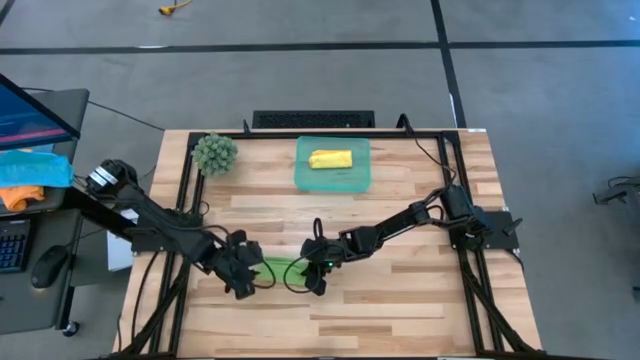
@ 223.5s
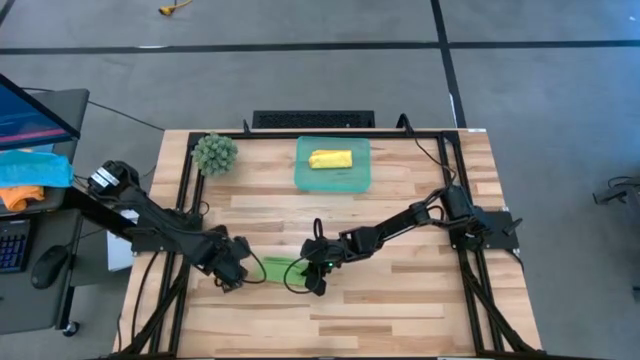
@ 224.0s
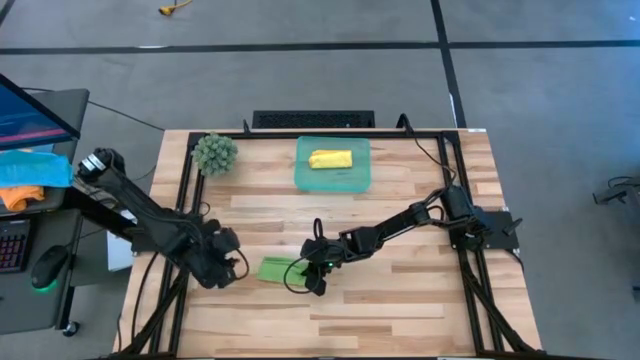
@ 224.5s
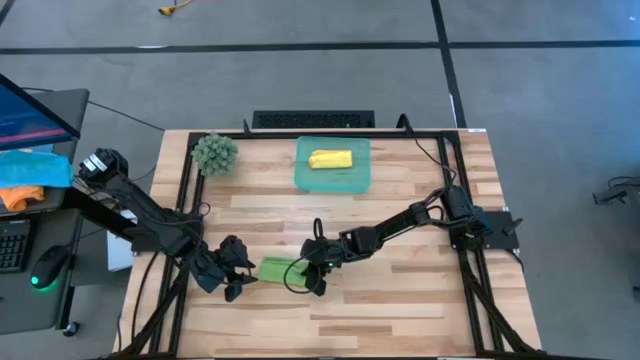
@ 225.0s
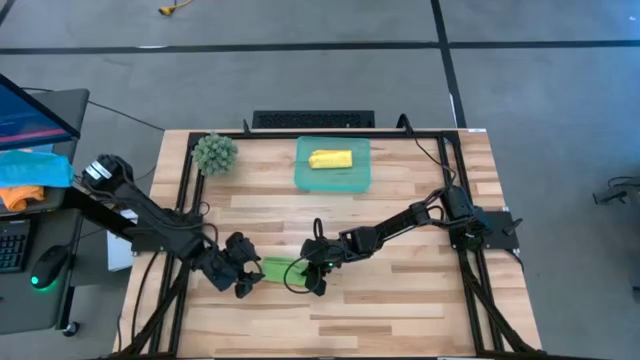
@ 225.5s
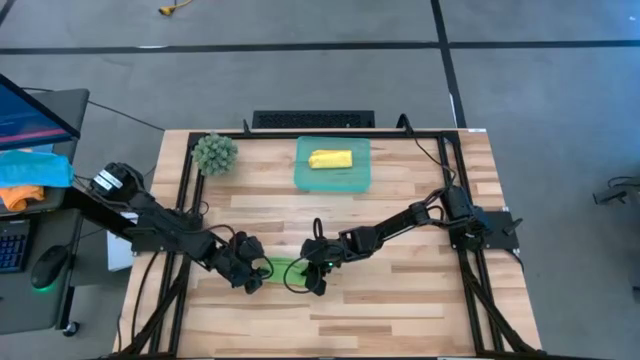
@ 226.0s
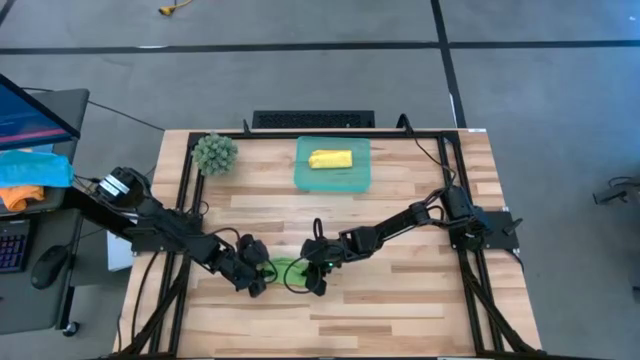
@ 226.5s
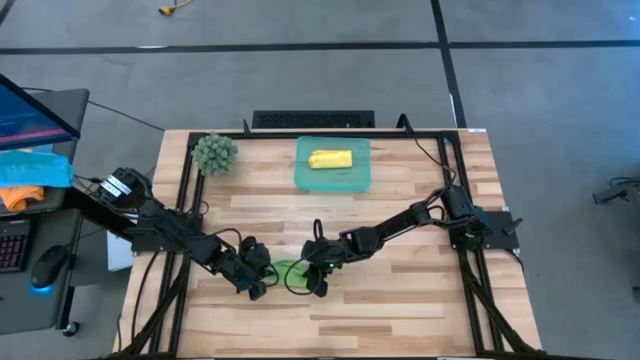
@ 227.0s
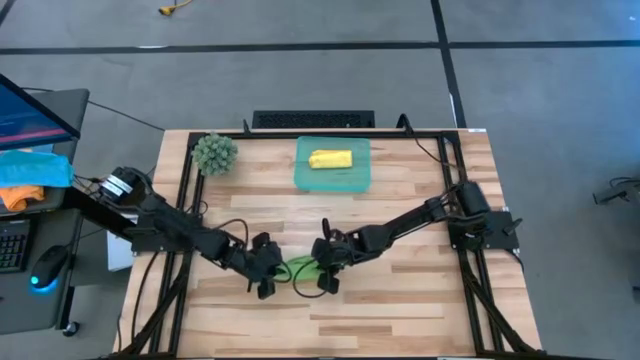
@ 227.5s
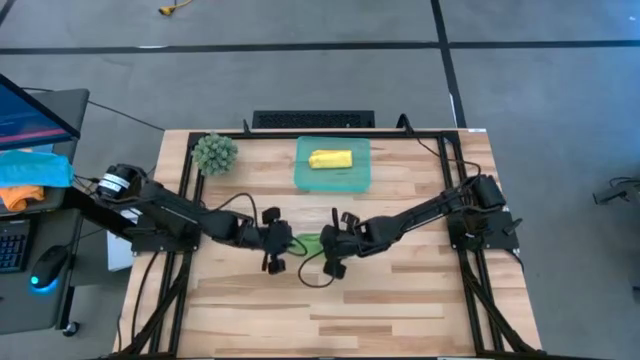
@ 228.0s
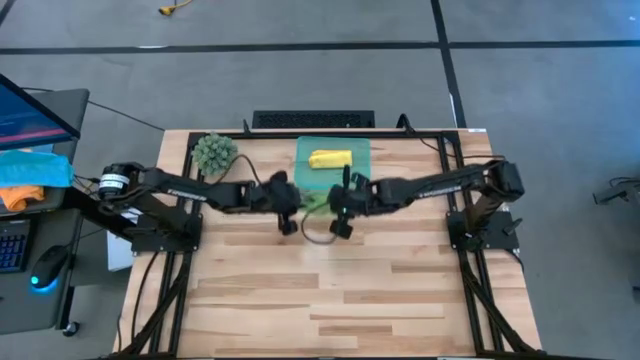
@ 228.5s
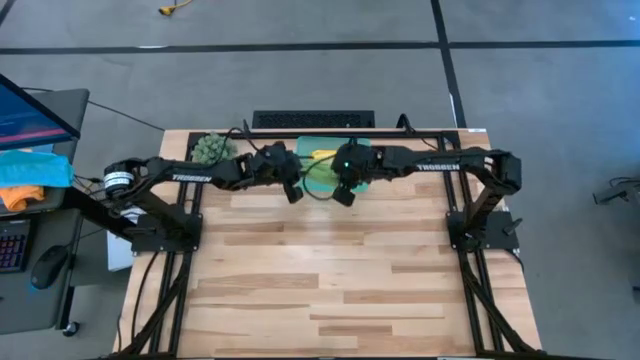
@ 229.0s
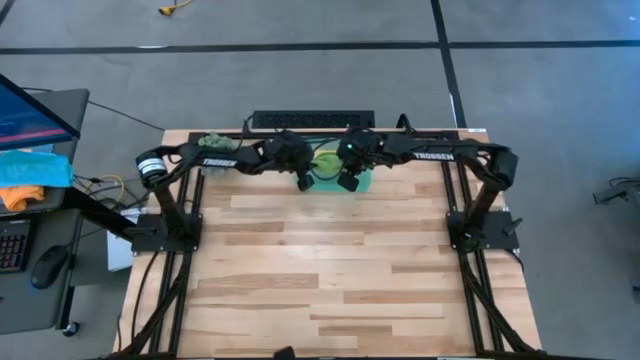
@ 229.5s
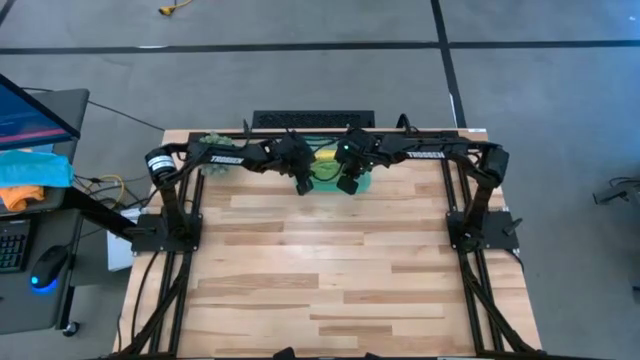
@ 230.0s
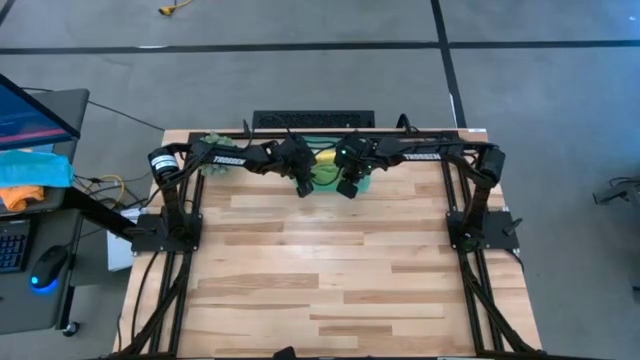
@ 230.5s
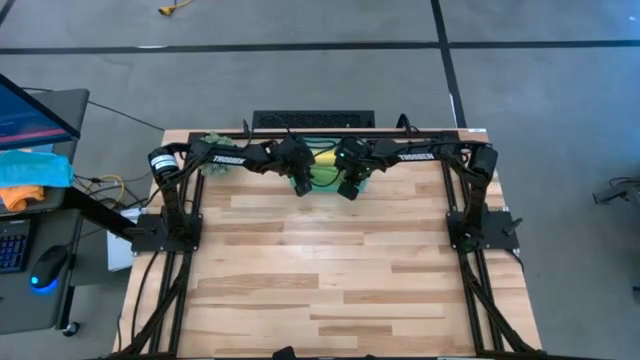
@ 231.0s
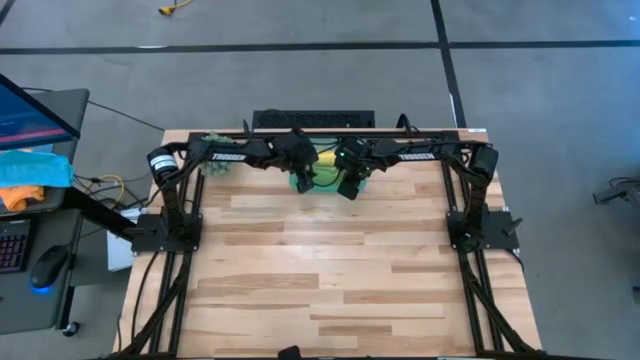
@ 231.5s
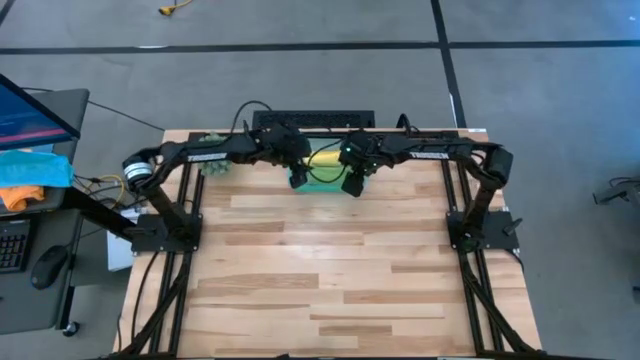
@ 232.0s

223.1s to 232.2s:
Task: Roll microfiber towels into tight, uniform cylinder then place into a basket
Put the green microfiber cloth into the green bin

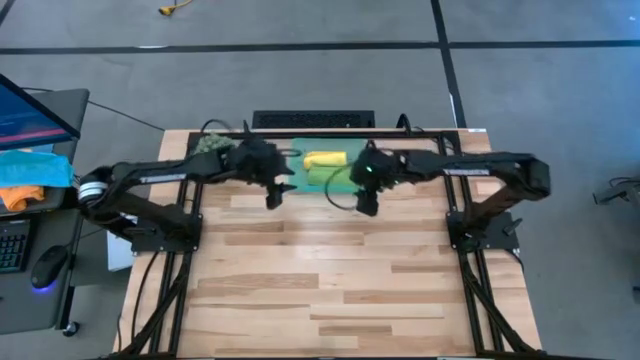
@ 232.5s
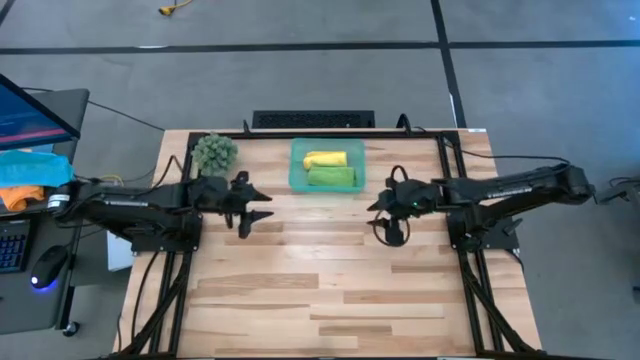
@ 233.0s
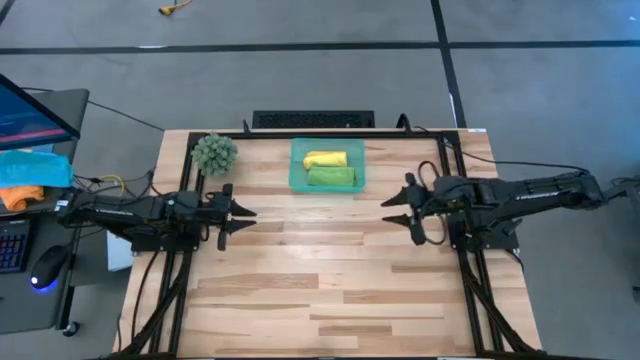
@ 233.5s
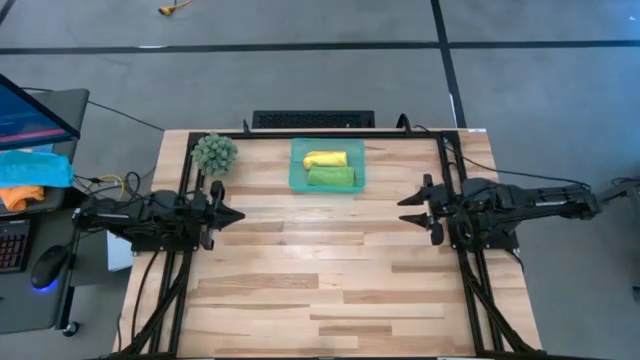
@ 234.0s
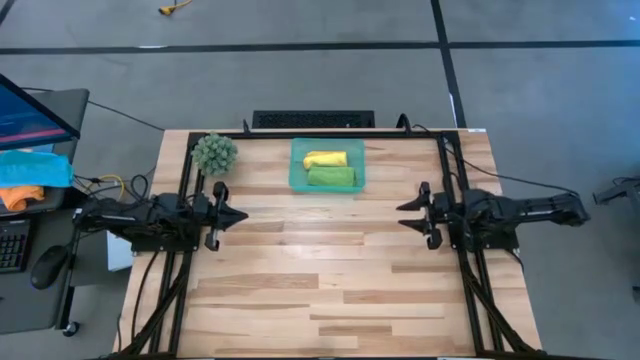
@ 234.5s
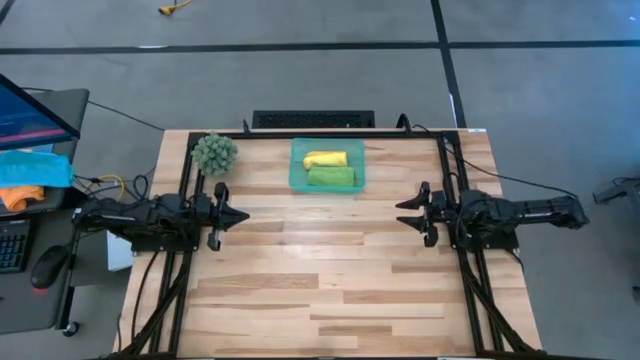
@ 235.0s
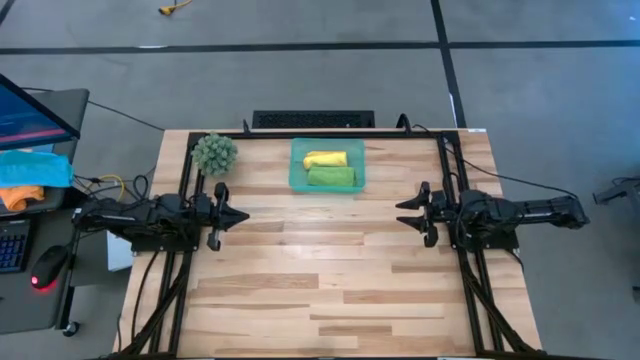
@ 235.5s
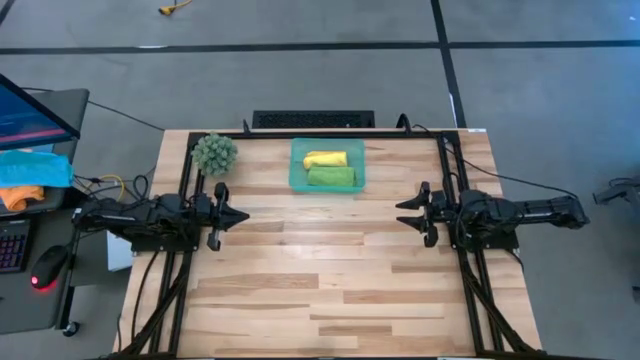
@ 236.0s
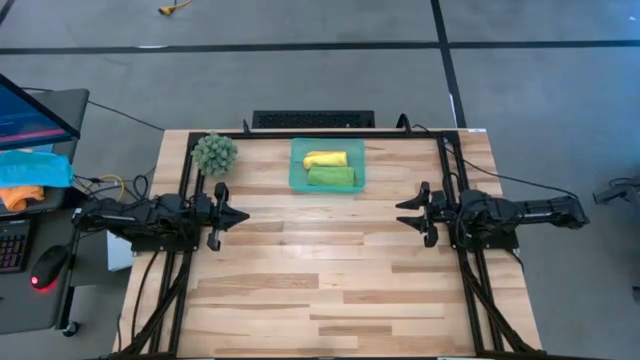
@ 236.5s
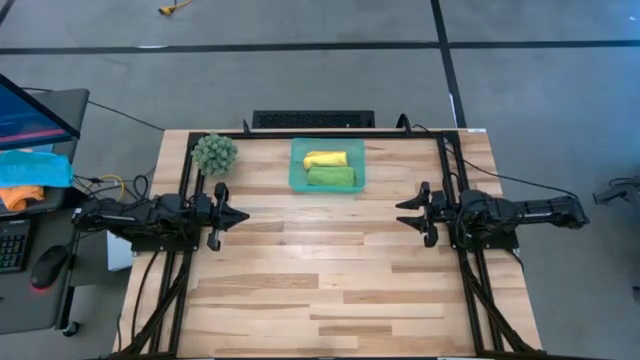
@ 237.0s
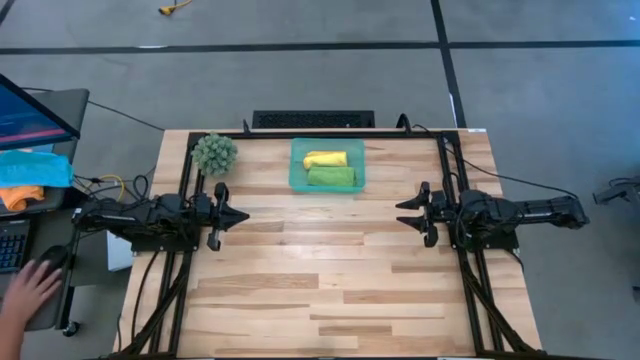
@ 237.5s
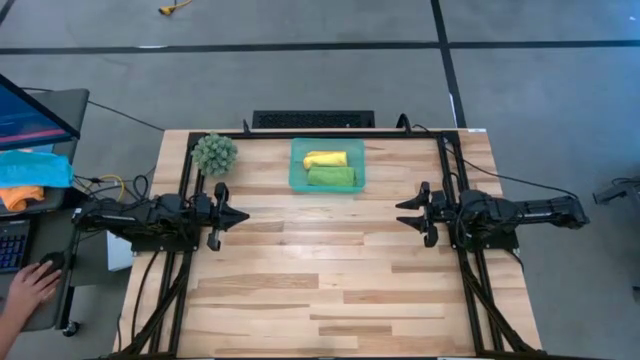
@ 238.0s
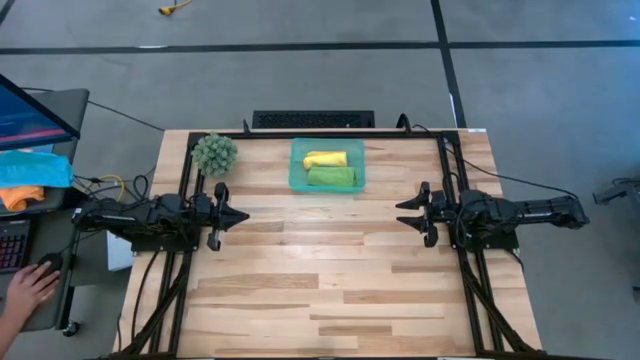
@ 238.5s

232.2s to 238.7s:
Return to Home Position

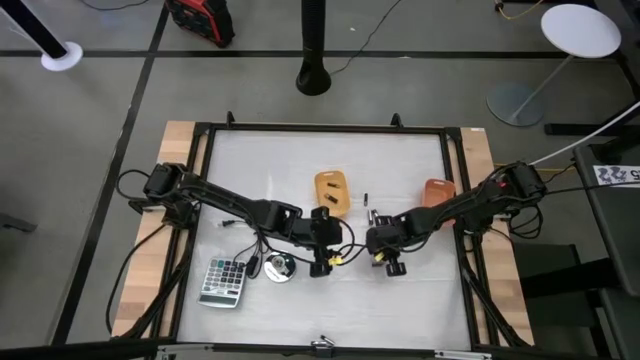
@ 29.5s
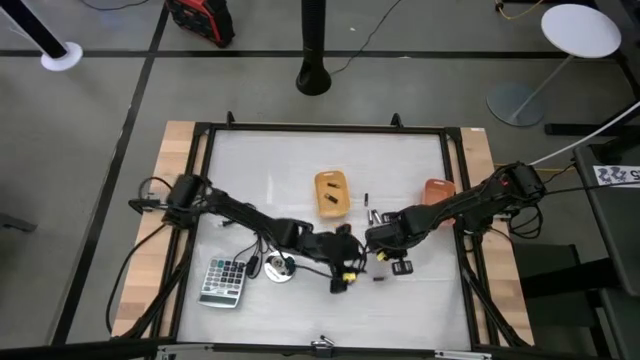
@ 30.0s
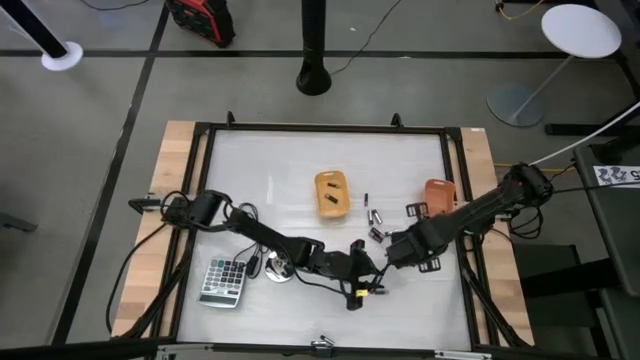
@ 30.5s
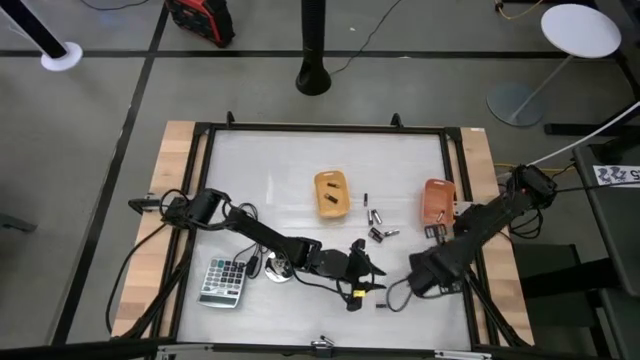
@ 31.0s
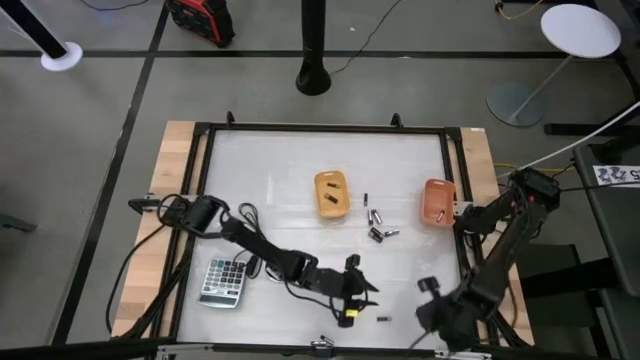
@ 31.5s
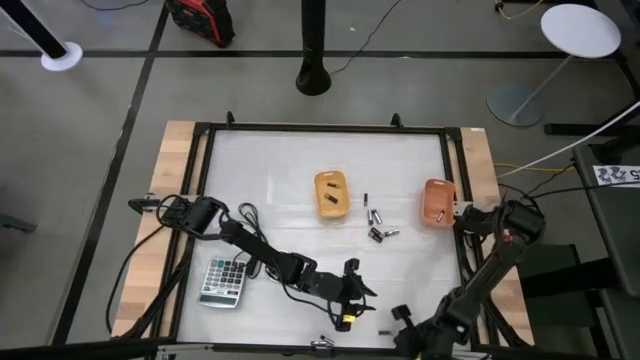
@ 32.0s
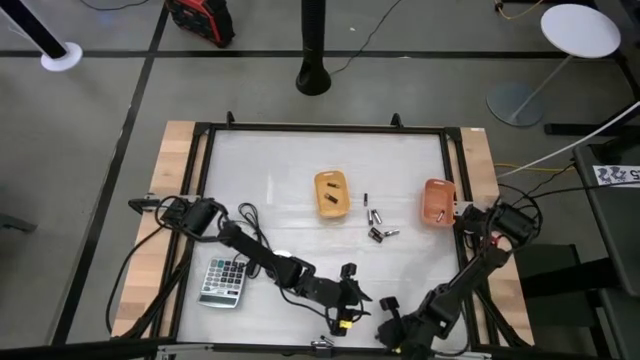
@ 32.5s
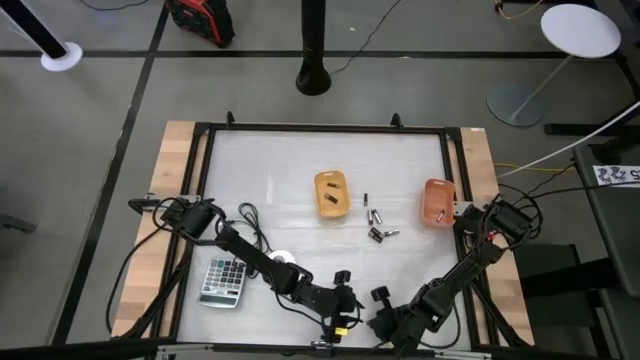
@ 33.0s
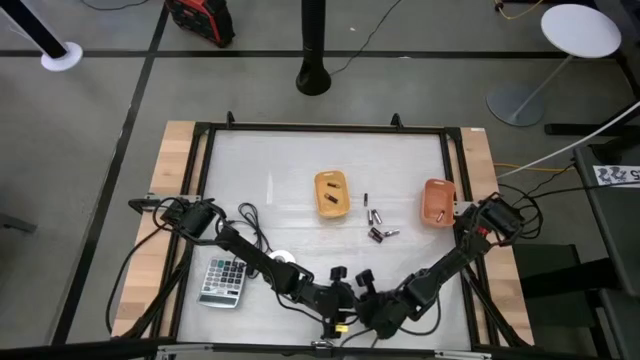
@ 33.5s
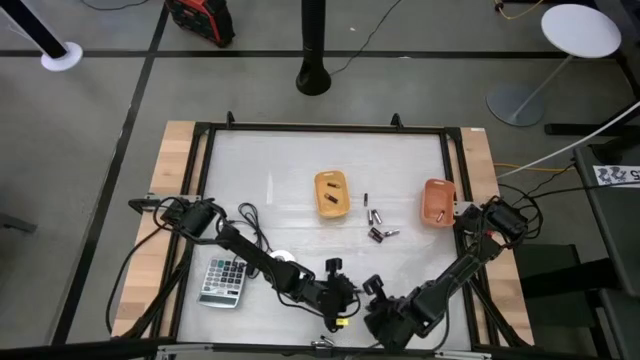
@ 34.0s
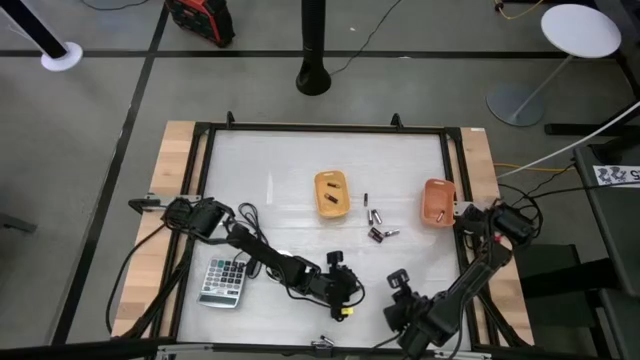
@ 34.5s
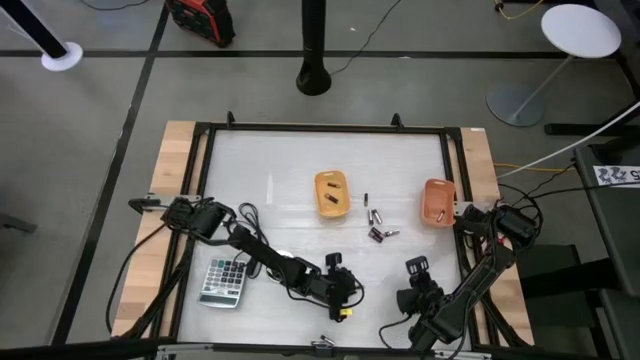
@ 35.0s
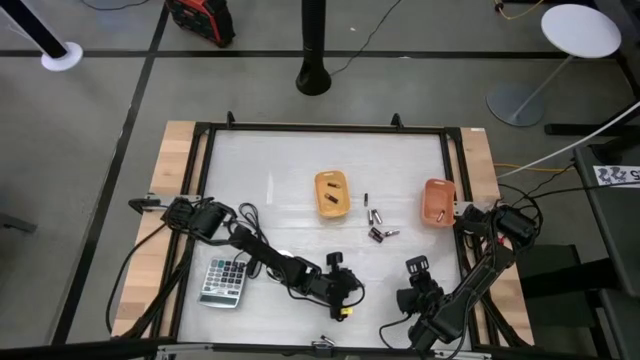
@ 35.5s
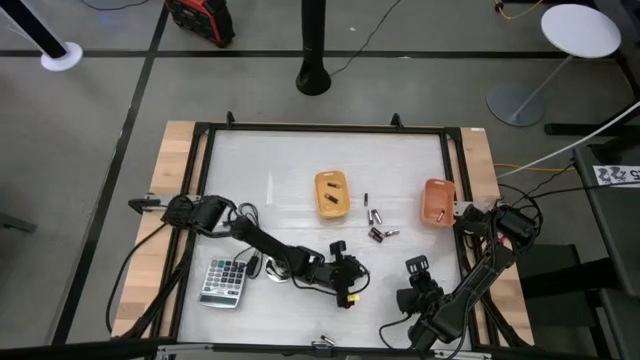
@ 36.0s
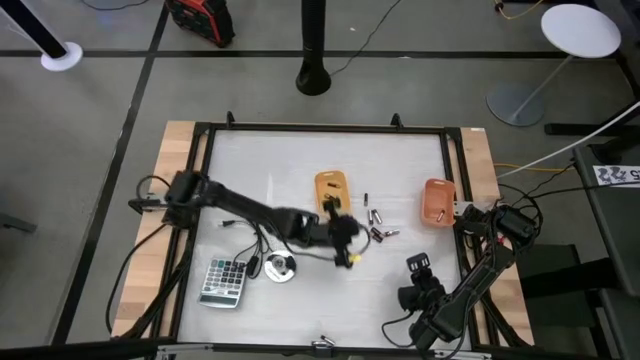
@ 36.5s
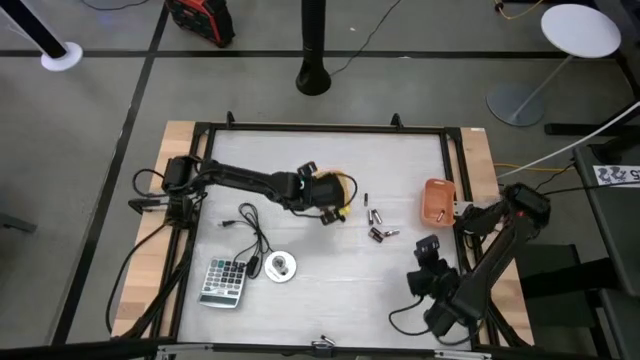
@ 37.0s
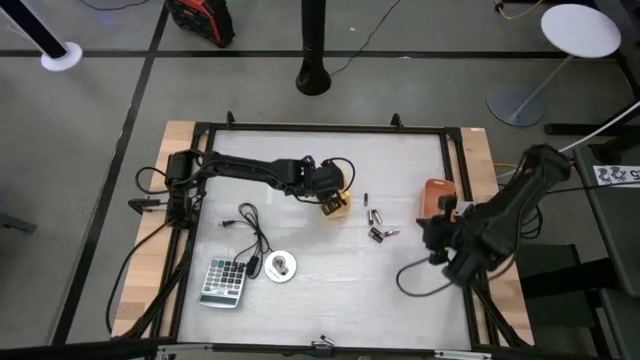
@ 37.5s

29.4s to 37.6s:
Task: Sort batteries
Put the black battery into the yellow bin
